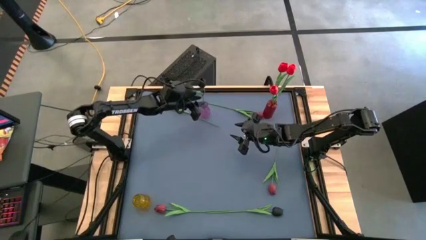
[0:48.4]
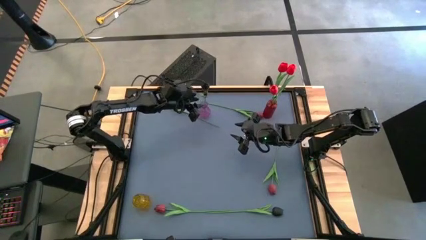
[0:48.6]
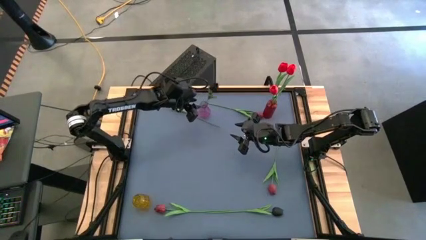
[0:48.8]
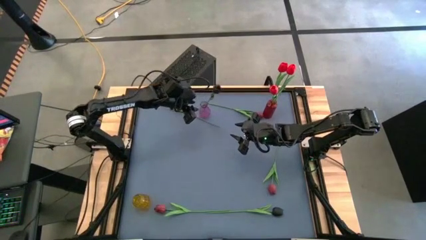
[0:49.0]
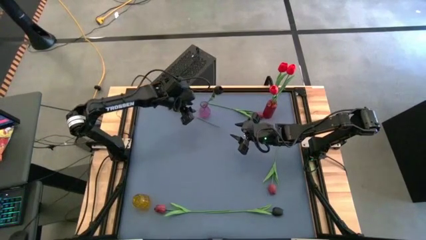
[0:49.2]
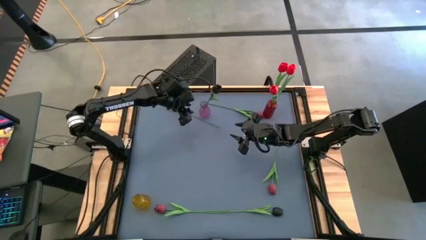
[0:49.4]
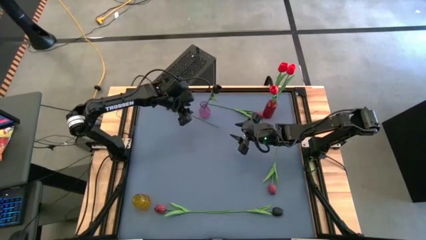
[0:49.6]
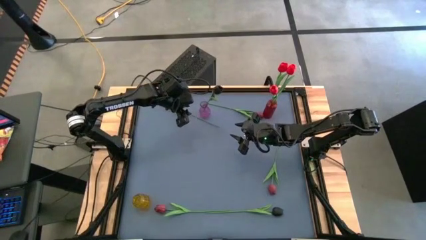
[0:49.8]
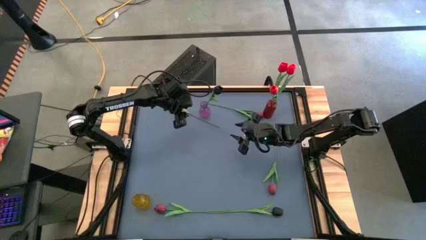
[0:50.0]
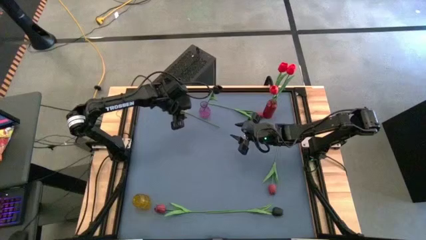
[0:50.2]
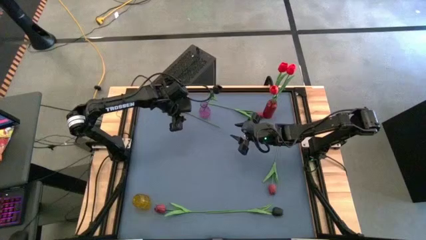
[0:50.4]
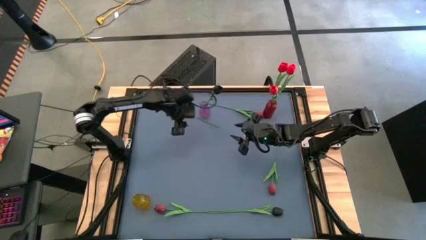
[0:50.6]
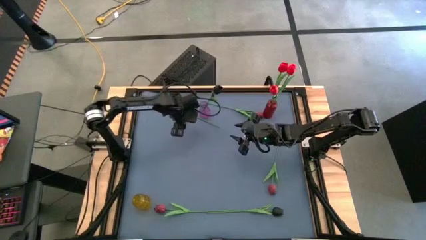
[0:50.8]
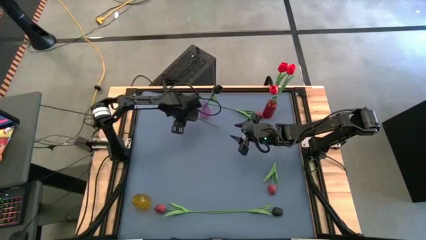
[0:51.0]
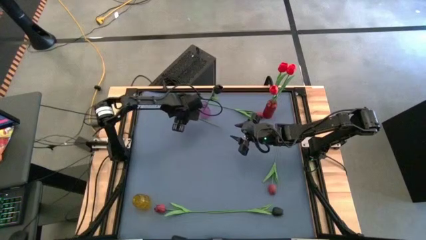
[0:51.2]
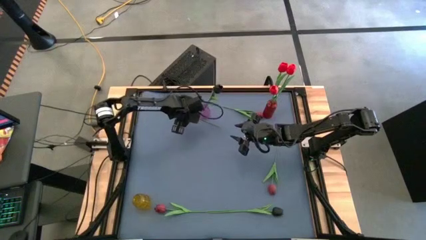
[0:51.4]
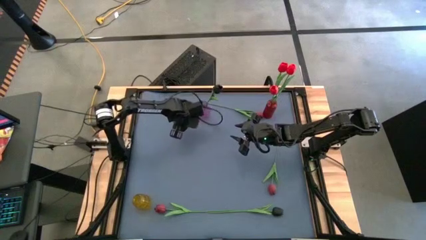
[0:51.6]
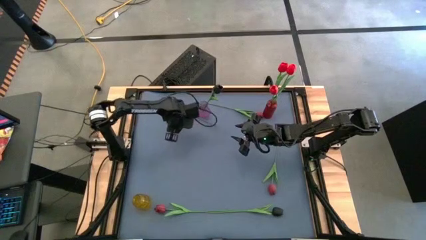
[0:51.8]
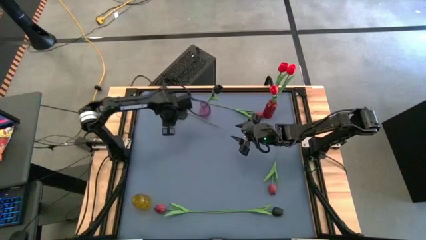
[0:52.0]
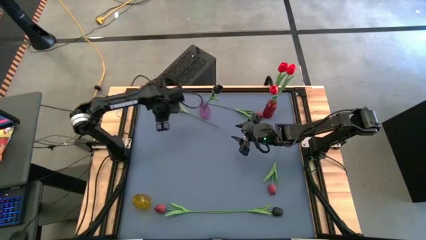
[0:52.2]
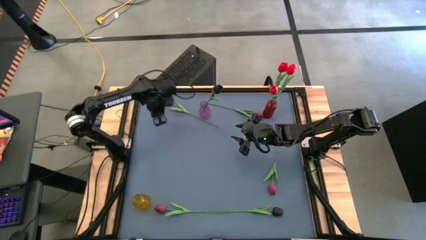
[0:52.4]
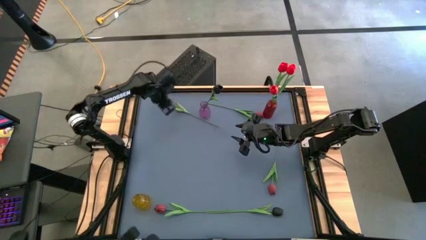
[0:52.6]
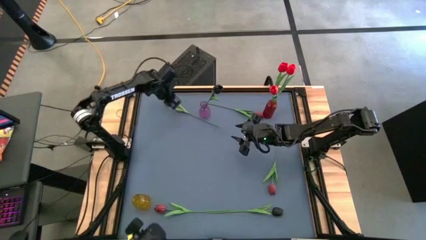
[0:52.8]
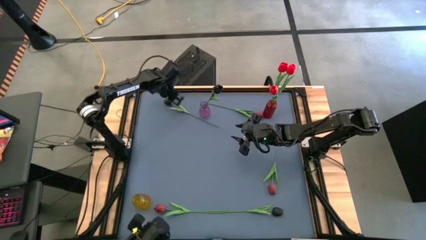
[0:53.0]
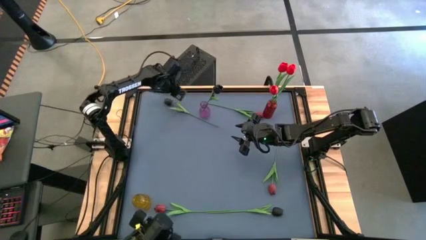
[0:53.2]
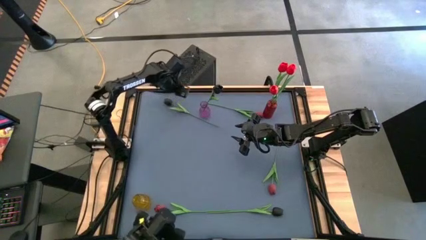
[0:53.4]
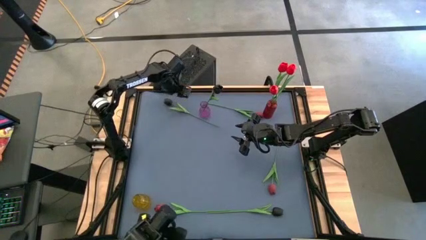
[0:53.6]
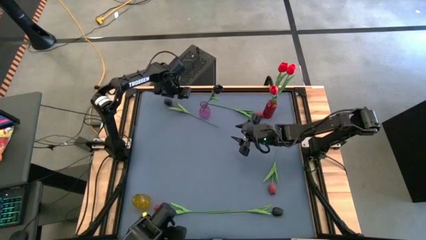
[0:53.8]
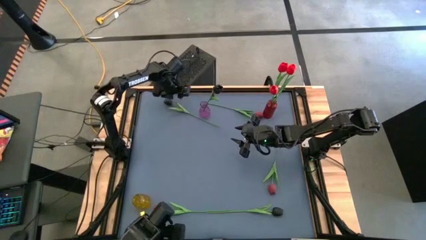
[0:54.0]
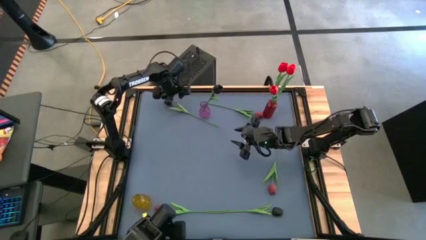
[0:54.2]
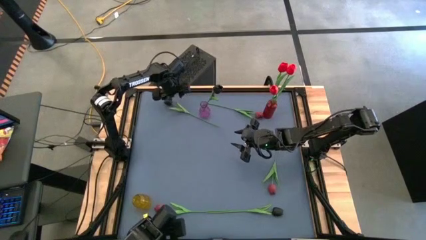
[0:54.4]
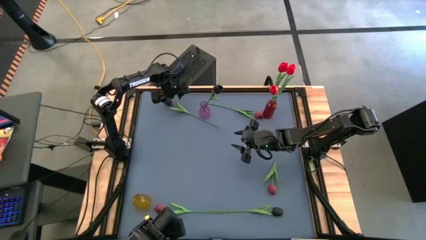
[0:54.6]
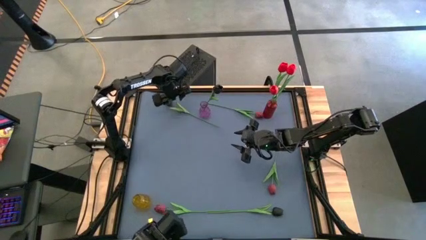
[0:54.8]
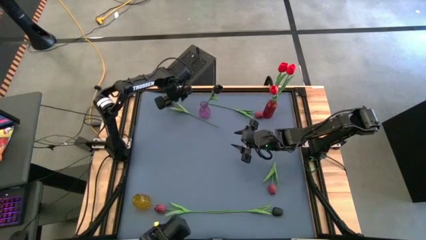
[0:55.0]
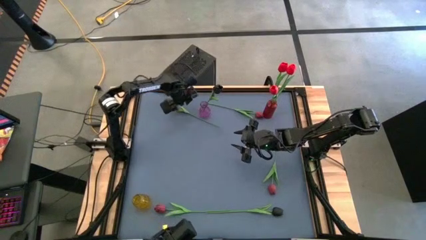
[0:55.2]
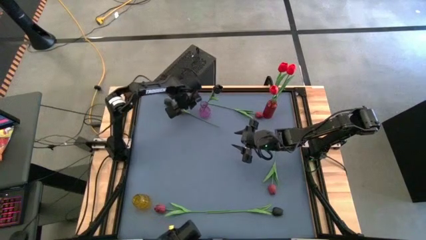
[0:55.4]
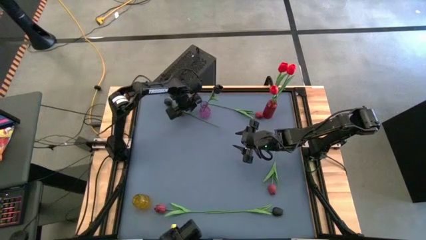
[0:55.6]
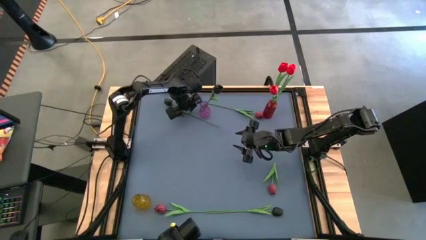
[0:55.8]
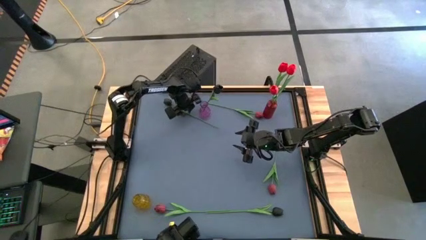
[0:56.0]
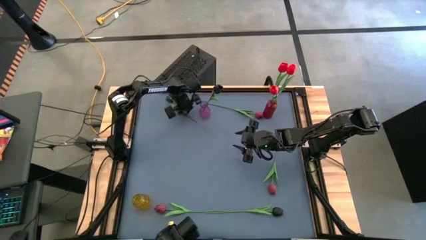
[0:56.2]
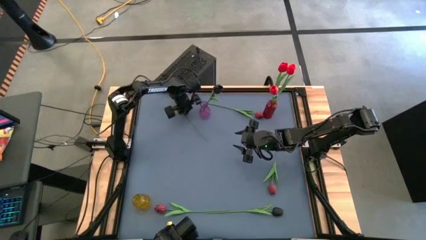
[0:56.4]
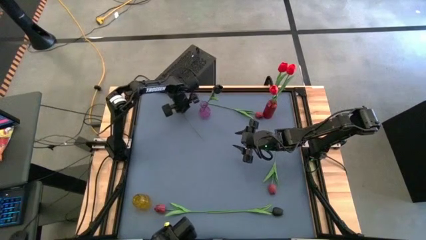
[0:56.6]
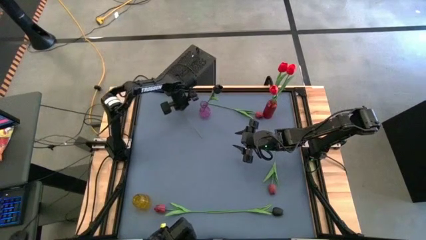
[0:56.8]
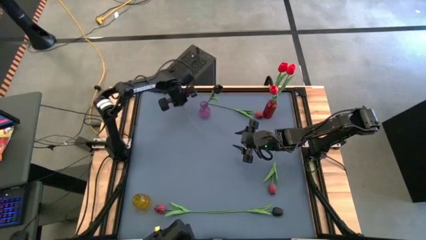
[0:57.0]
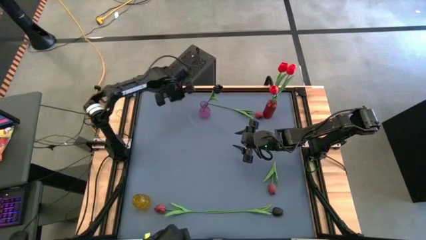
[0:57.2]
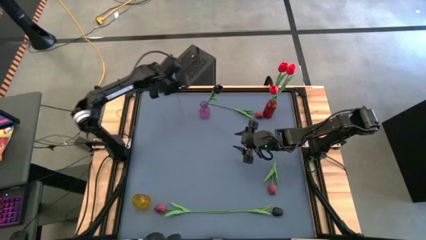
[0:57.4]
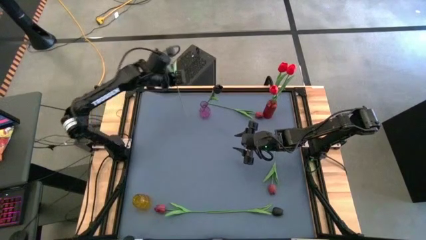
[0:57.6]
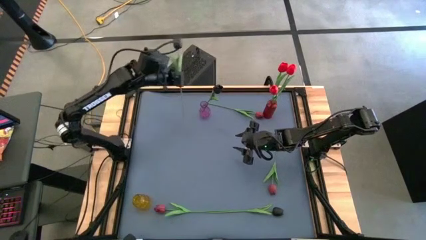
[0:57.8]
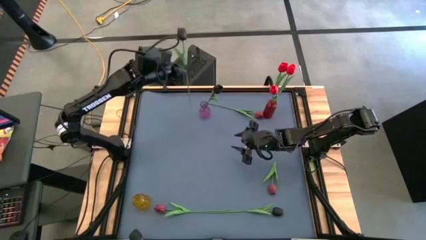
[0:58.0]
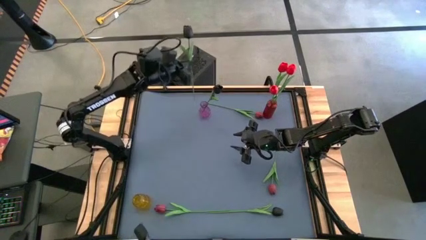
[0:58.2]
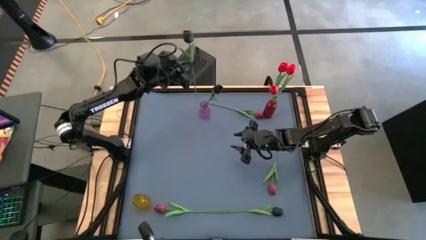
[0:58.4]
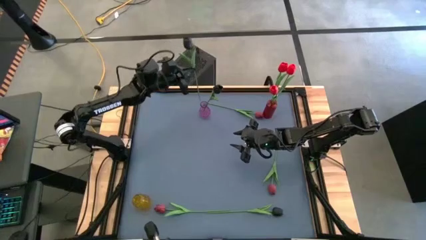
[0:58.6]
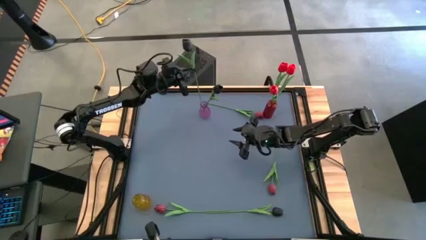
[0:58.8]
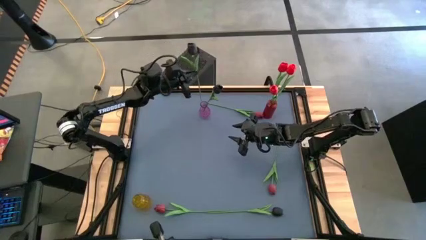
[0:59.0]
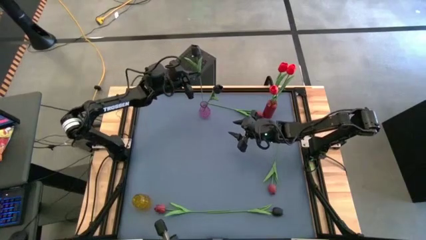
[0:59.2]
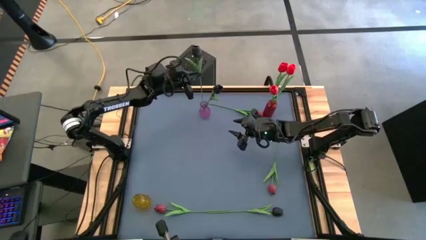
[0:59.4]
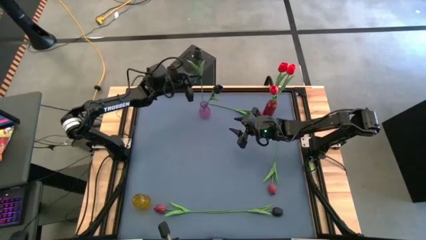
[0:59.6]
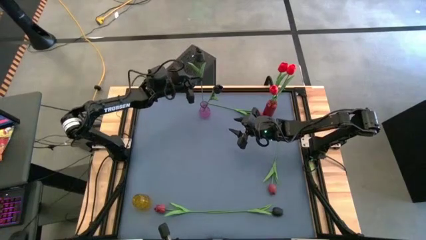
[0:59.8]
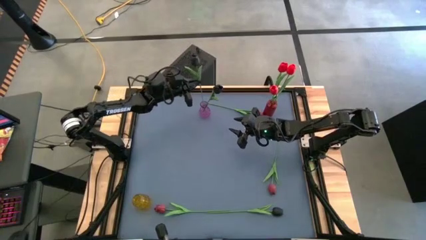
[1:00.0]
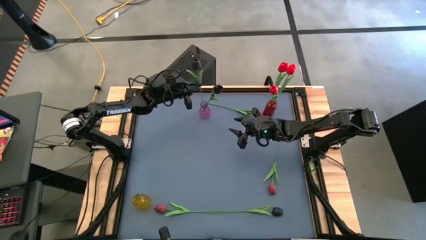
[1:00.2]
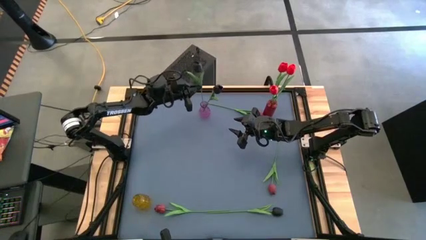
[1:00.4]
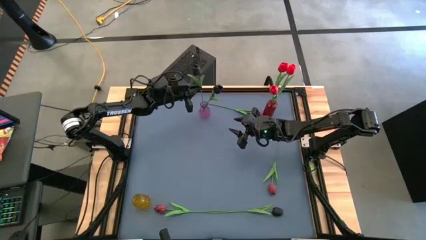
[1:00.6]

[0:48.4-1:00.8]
Task: Sort flowers into vase by color
Put the top black flower into the violet vase
